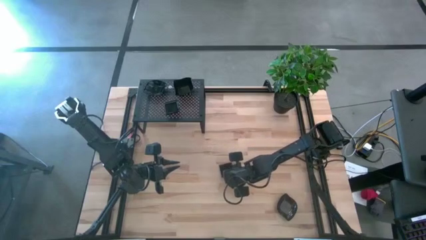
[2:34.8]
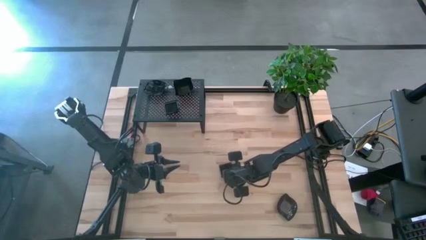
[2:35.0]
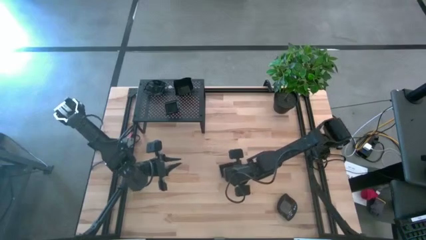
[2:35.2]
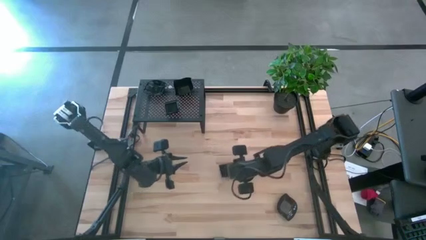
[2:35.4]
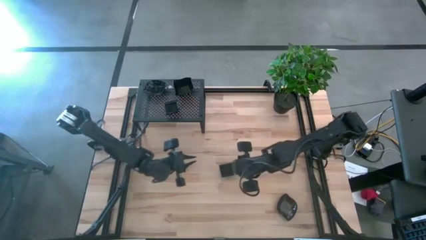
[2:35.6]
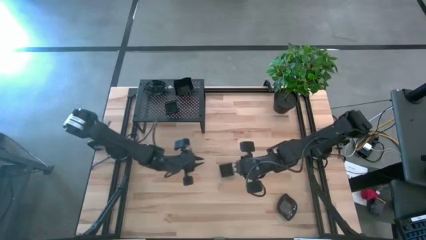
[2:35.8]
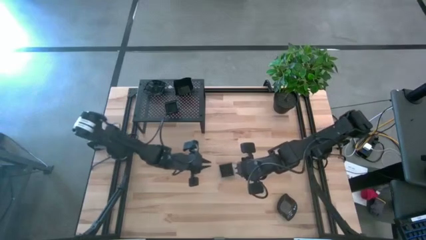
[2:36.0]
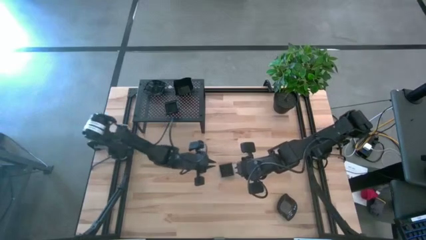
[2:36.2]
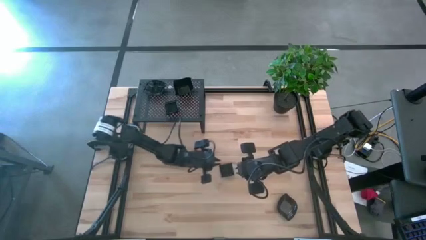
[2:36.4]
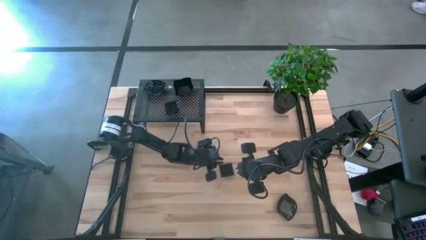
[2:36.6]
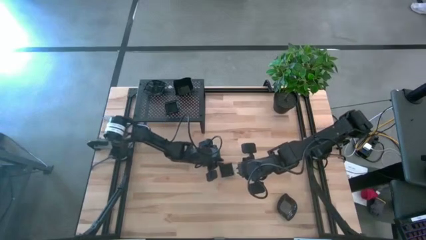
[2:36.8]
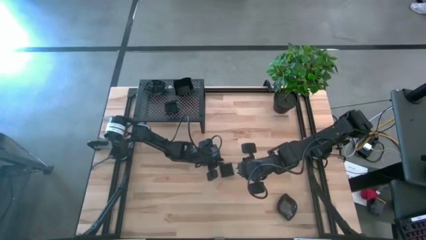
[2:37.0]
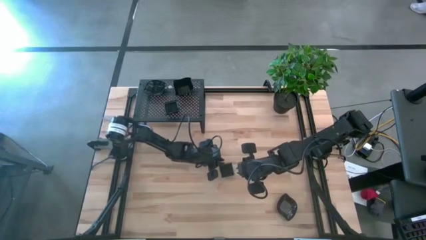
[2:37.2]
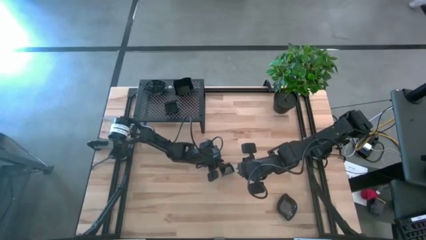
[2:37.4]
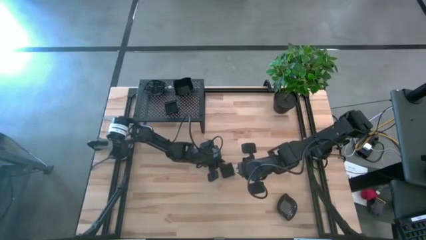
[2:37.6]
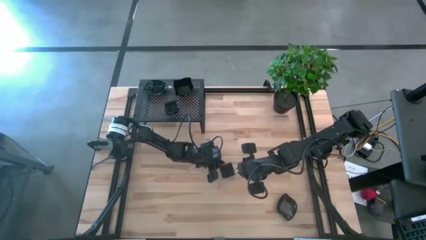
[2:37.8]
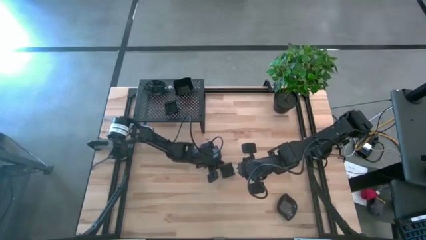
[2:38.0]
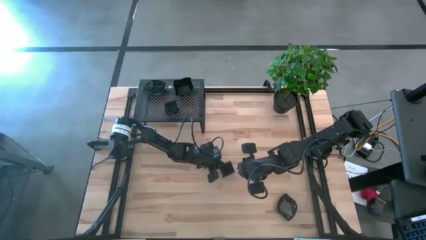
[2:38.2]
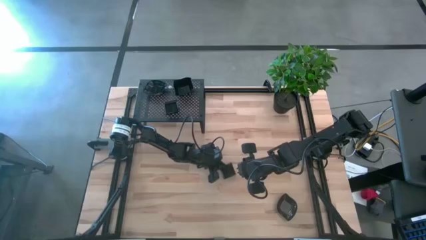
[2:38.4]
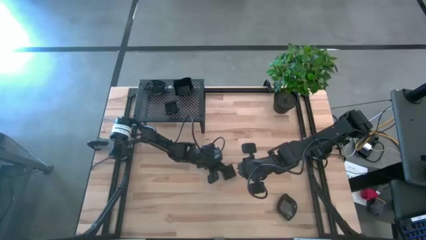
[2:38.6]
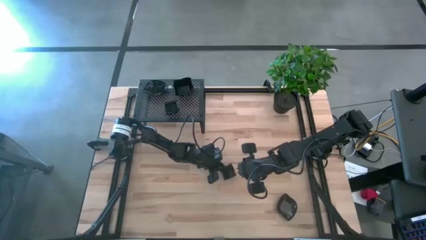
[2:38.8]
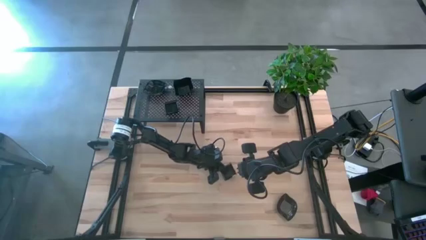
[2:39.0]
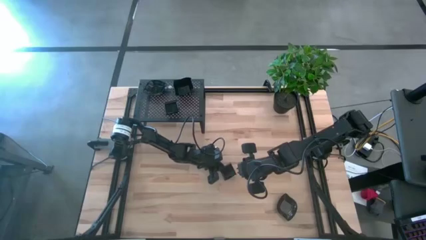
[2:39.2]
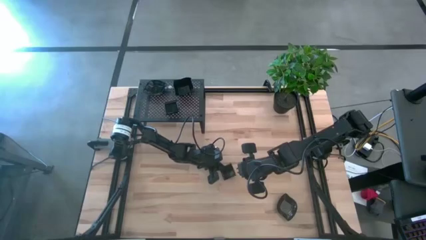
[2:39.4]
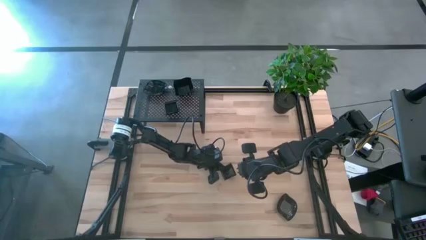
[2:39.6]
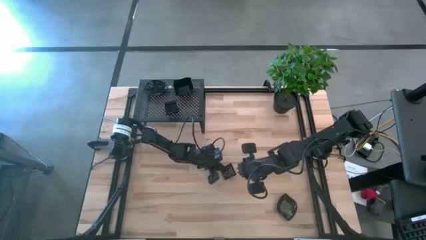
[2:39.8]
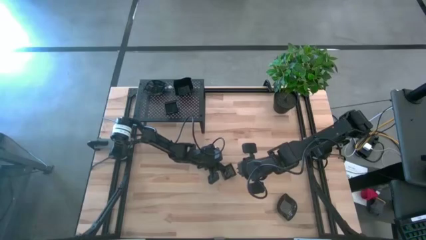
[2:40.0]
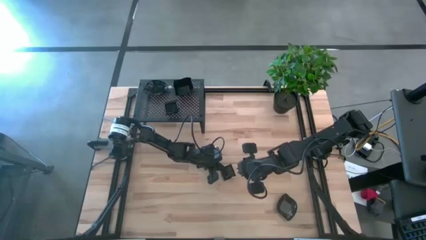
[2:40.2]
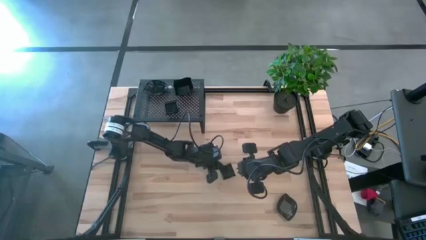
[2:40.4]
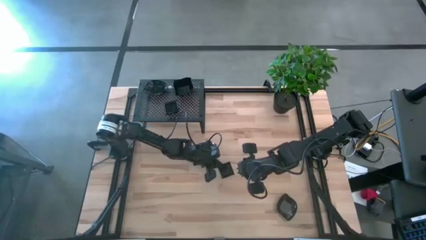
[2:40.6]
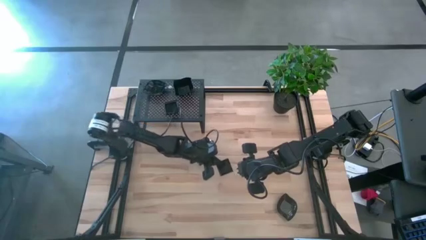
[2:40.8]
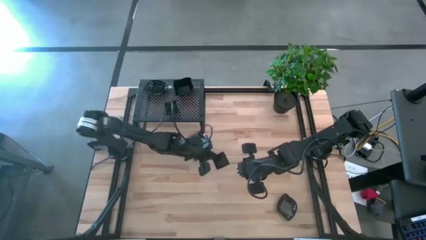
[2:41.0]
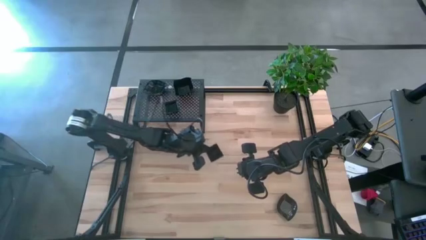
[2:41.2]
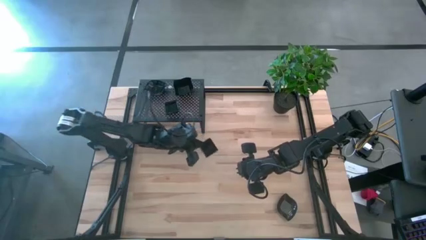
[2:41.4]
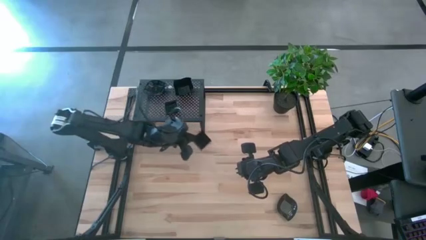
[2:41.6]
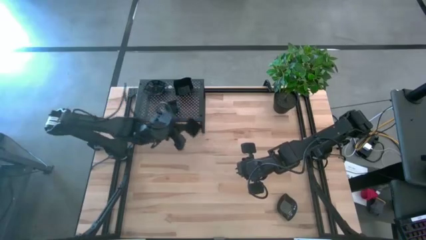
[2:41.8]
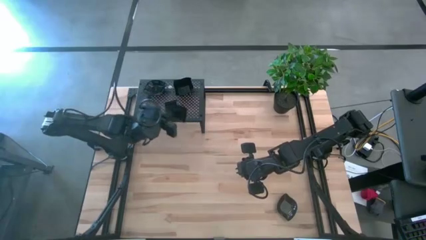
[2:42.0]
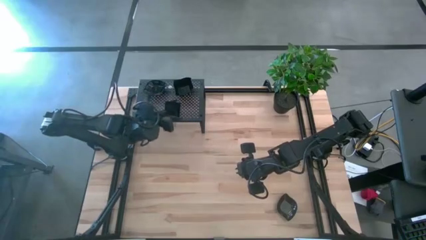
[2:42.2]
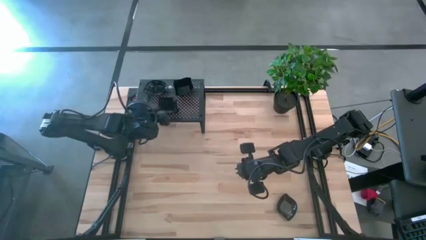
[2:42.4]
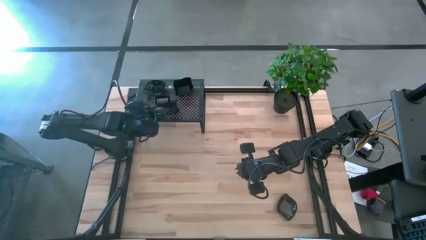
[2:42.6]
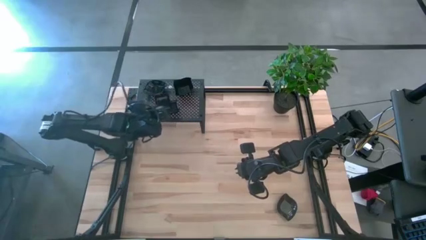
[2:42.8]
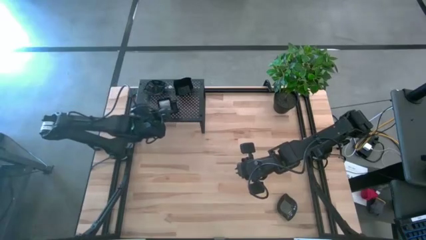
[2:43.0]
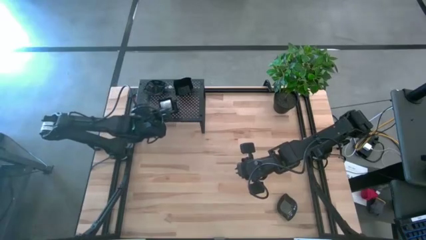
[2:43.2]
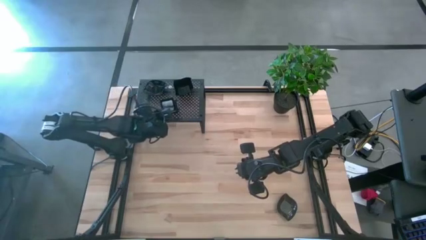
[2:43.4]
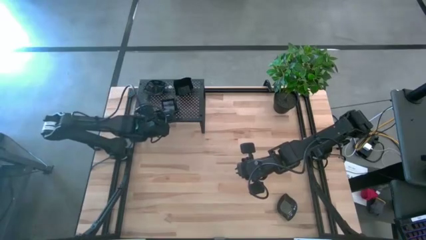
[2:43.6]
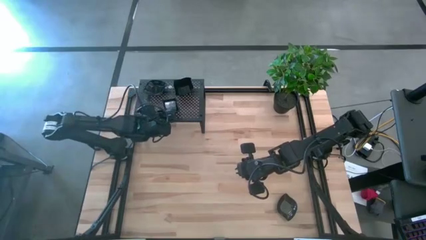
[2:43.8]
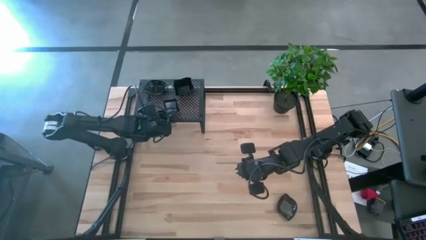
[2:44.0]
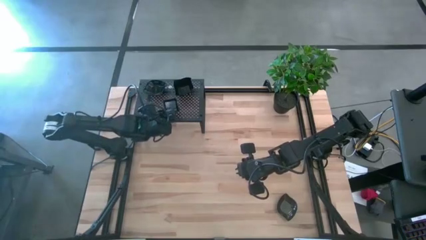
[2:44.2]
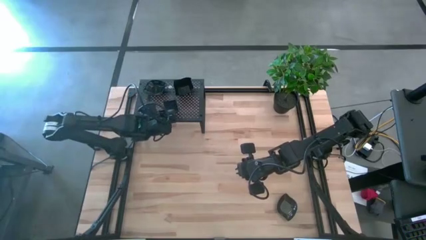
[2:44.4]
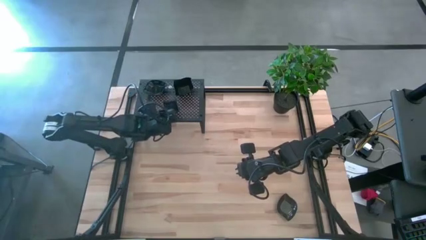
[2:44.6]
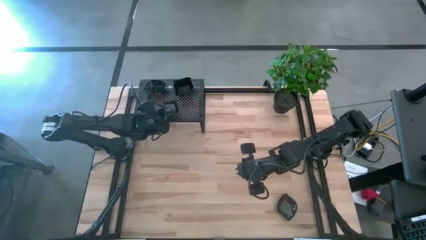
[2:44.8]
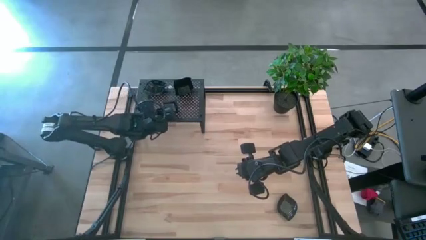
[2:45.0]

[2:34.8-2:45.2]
Task: Pick & Place Mini shaped plates
Stack the square plate on top of the stacked square plate on the shelf

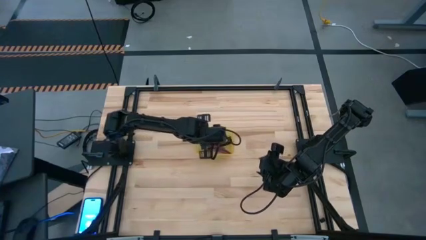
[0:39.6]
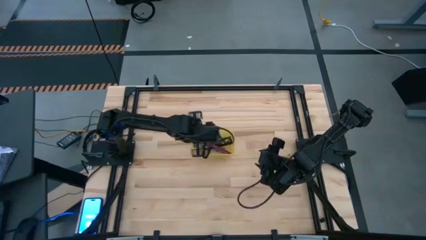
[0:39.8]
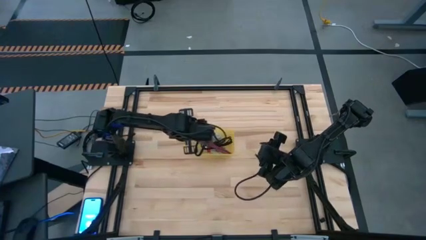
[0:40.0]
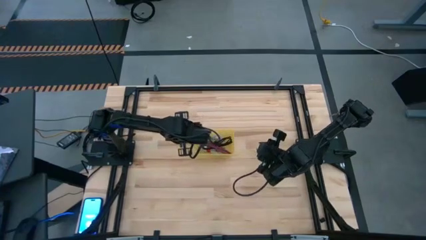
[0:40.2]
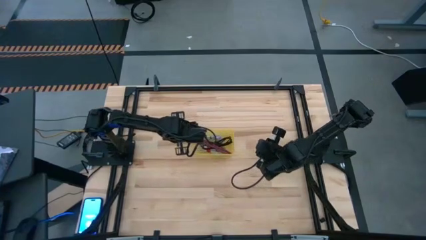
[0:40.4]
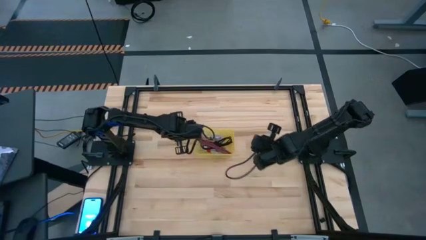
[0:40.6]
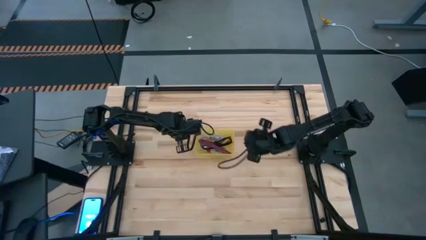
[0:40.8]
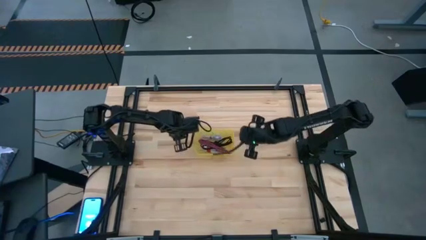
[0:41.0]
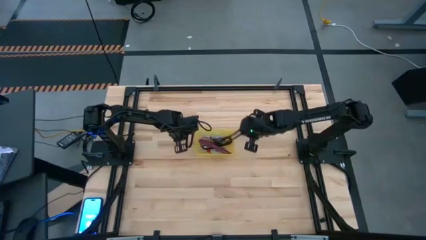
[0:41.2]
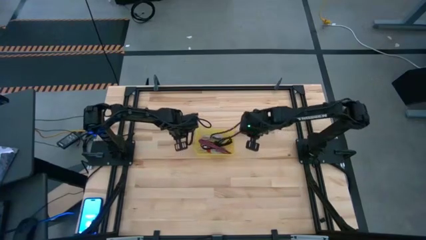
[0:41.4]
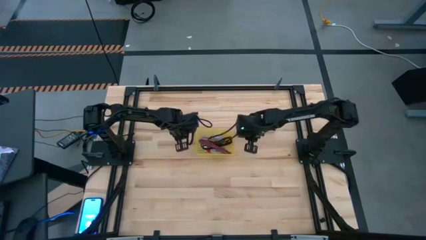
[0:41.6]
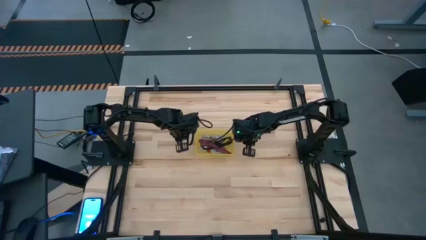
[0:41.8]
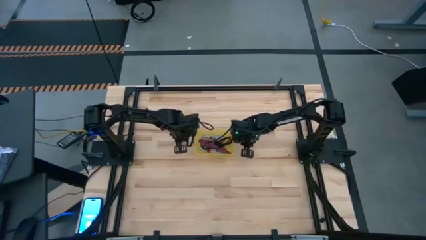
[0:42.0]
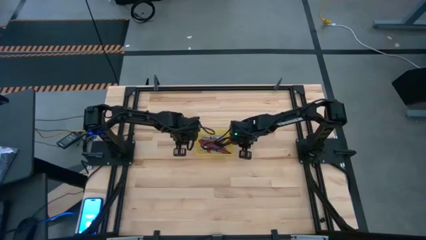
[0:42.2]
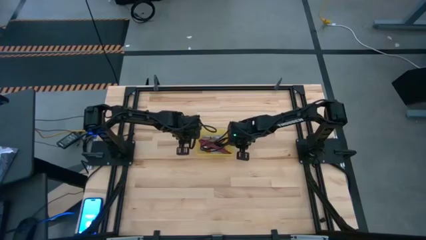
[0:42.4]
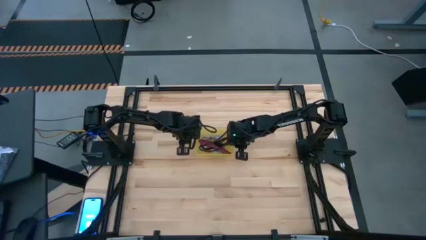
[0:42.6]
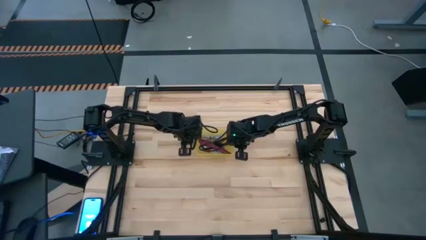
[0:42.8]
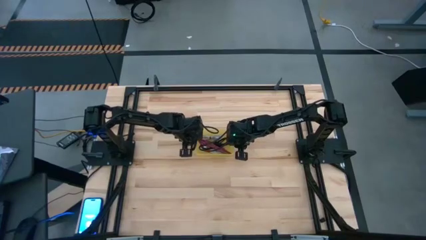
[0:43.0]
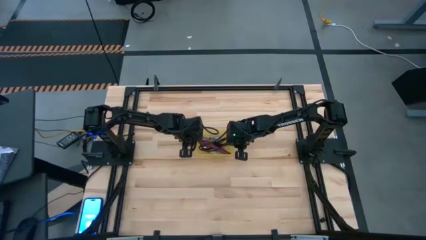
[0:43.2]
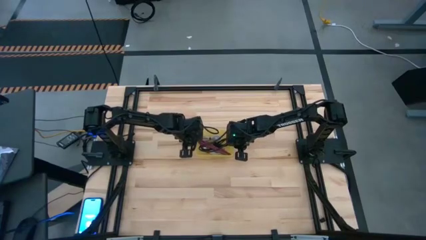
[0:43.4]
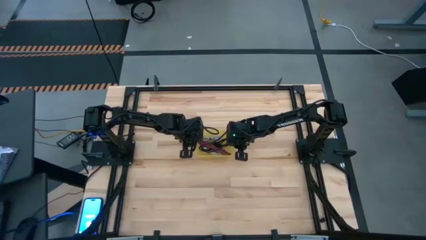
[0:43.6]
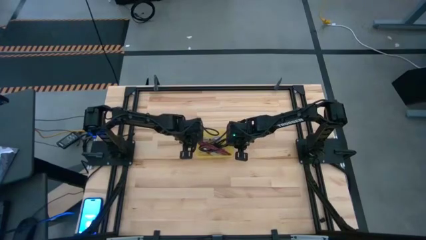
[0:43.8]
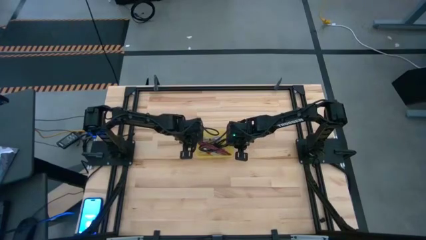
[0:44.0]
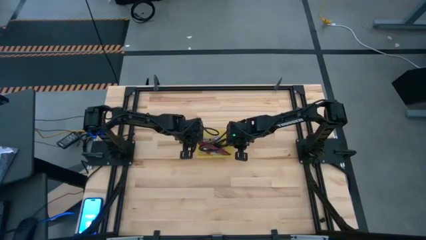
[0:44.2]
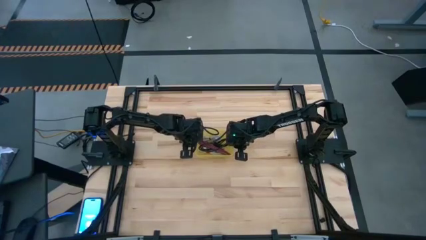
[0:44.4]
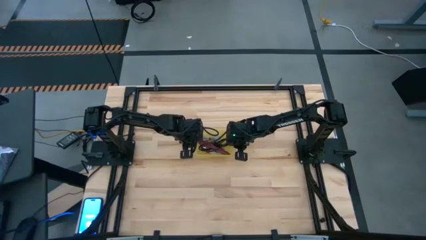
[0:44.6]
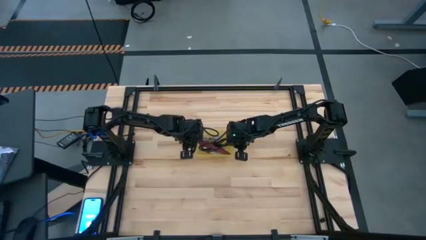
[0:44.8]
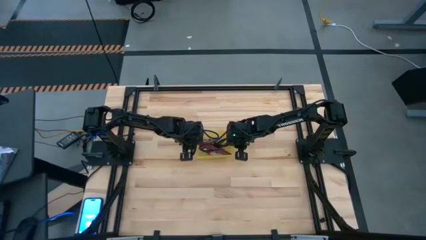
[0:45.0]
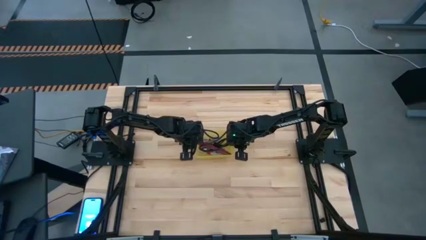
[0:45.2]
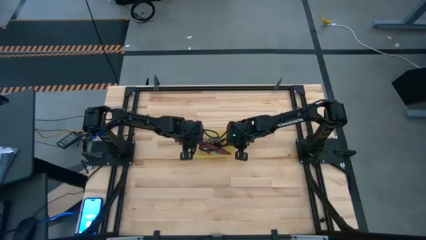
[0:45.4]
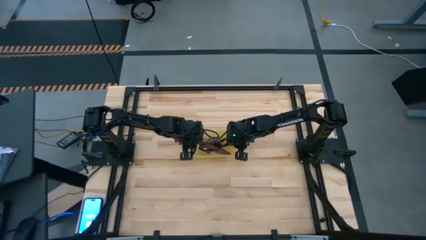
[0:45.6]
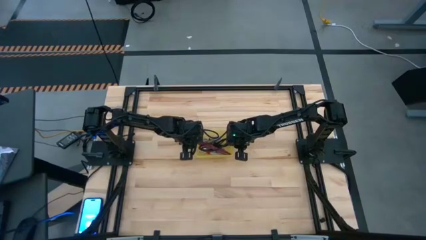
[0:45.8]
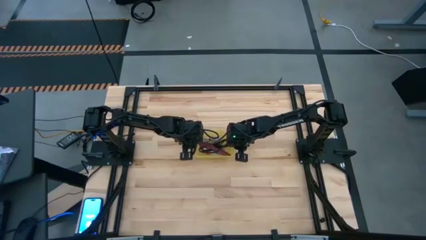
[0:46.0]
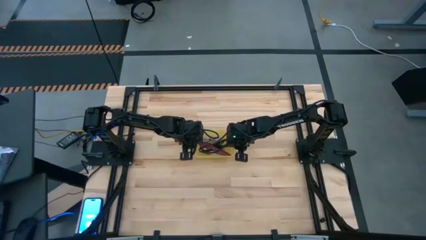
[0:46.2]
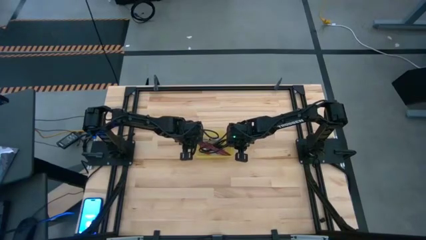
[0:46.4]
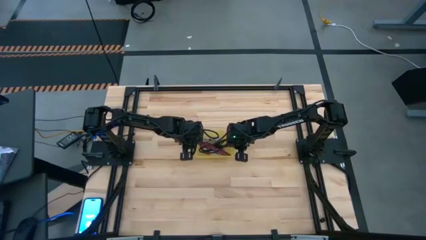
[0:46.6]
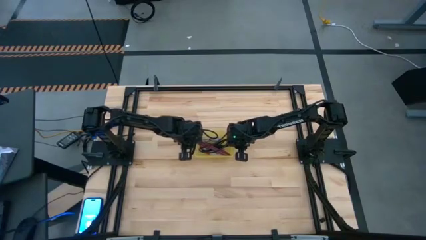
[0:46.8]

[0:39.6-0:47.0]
Task: Pick and place USB-C Cables
Adjust the yellow transparent bin
